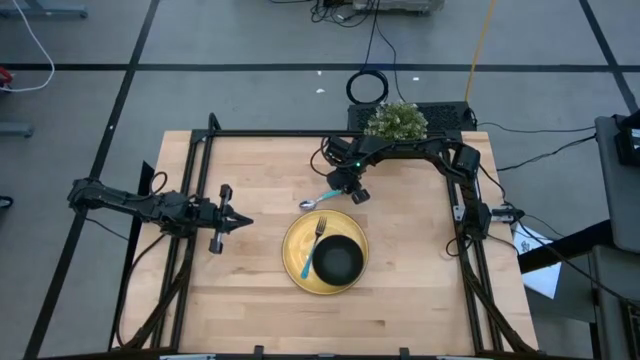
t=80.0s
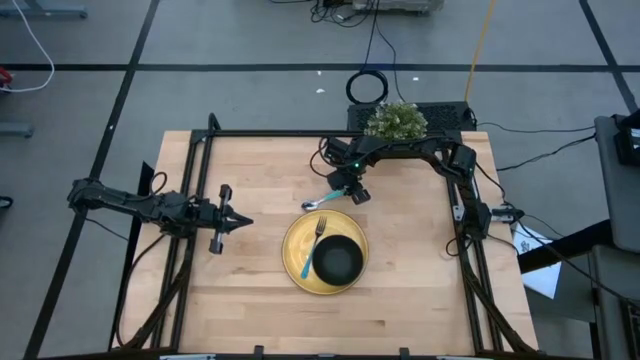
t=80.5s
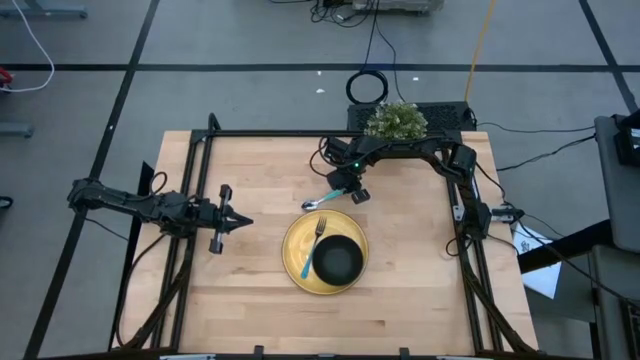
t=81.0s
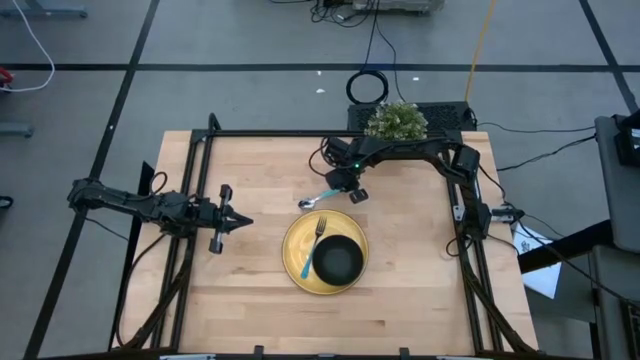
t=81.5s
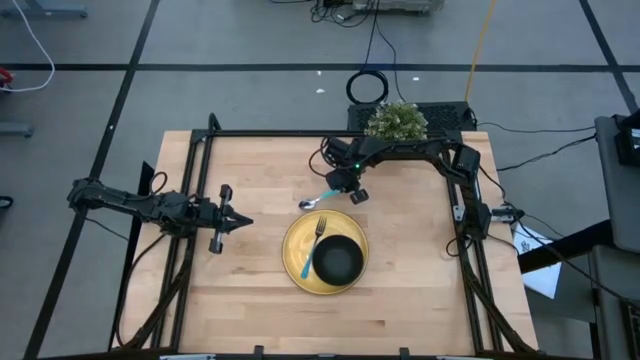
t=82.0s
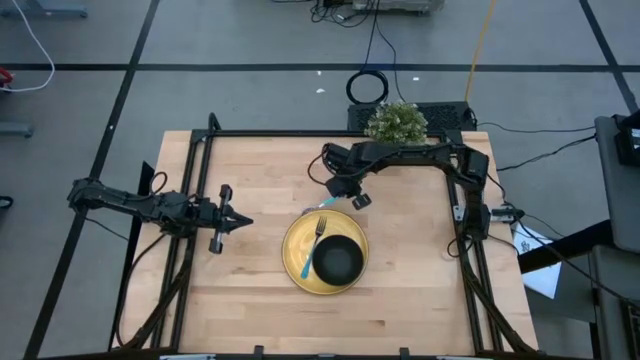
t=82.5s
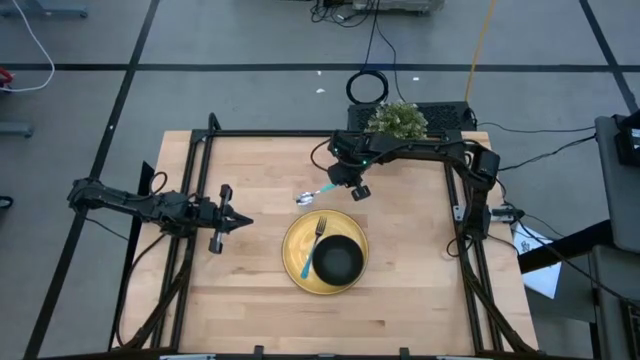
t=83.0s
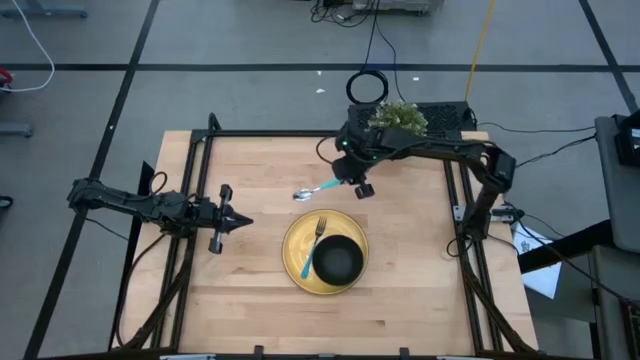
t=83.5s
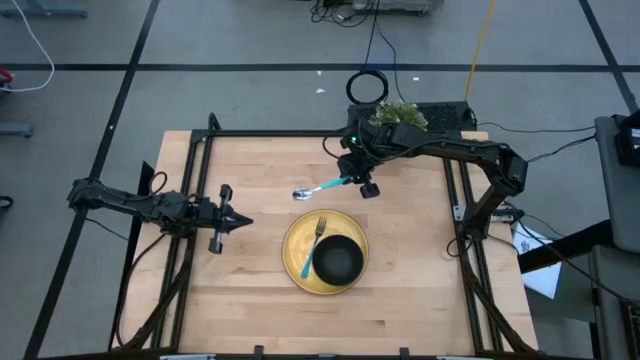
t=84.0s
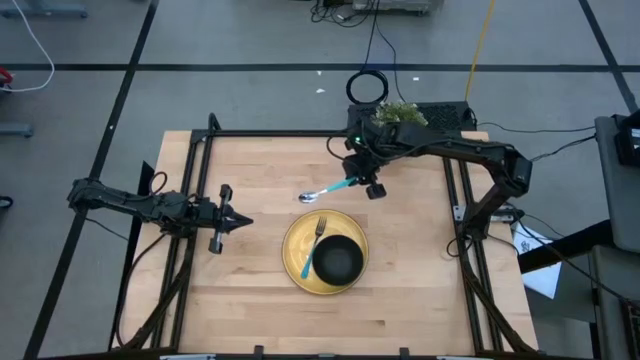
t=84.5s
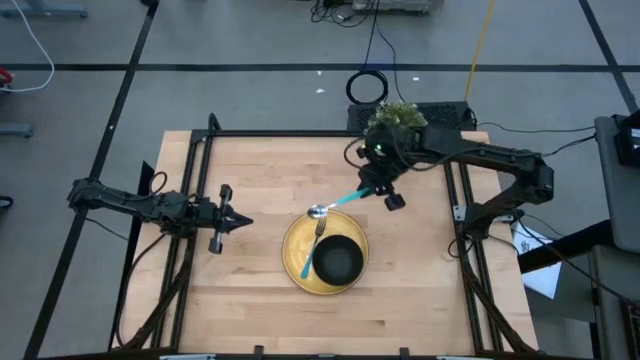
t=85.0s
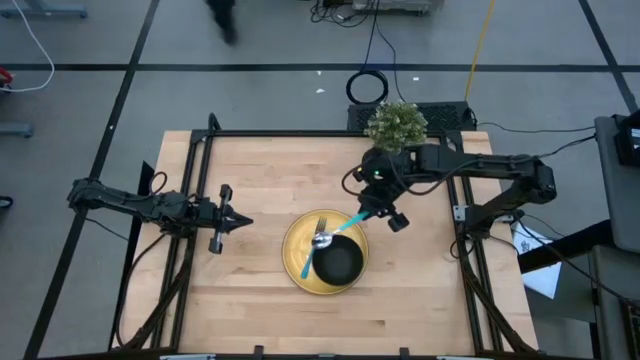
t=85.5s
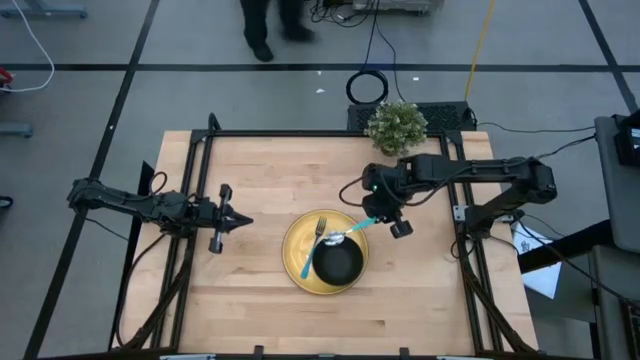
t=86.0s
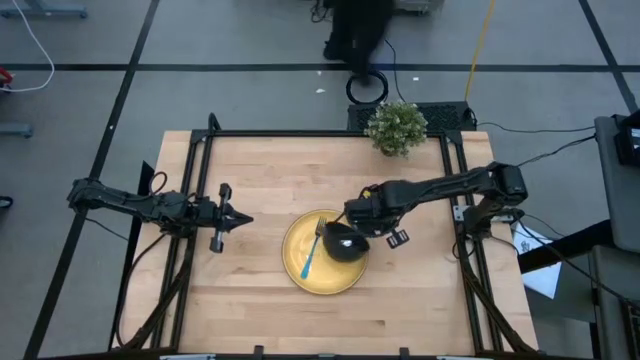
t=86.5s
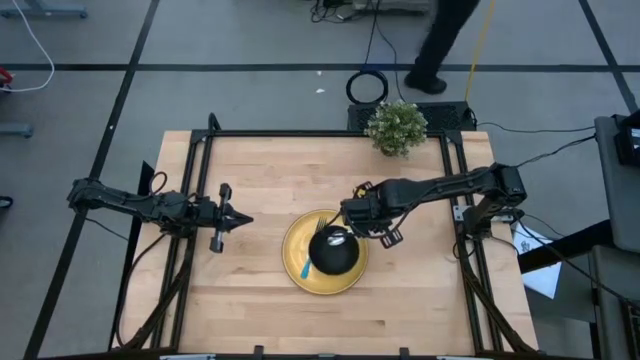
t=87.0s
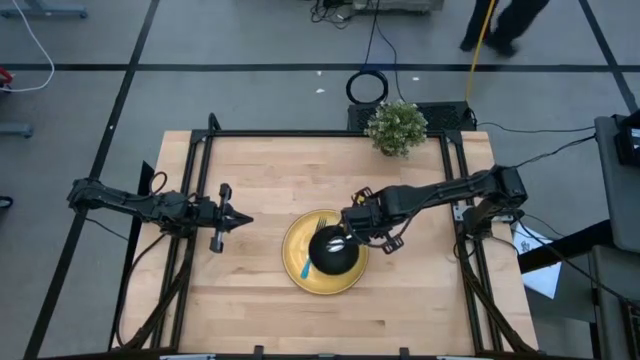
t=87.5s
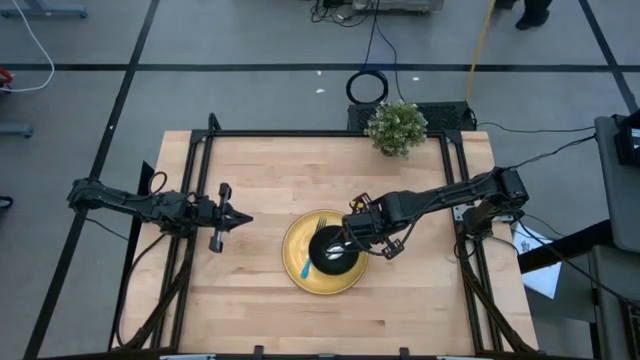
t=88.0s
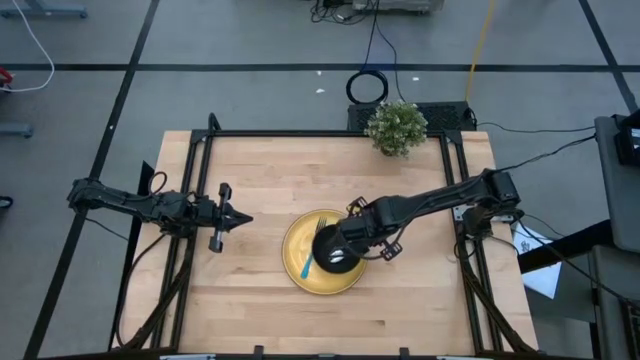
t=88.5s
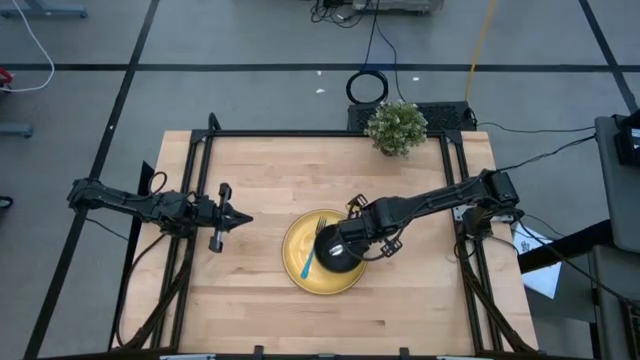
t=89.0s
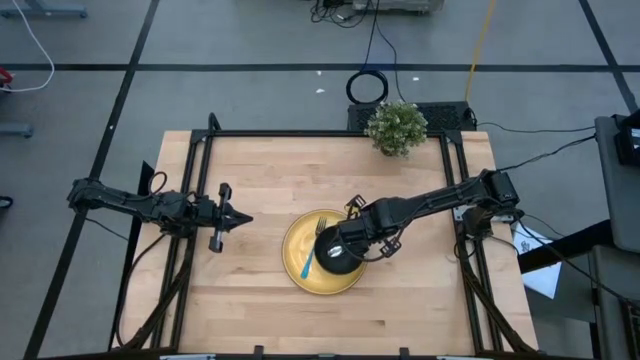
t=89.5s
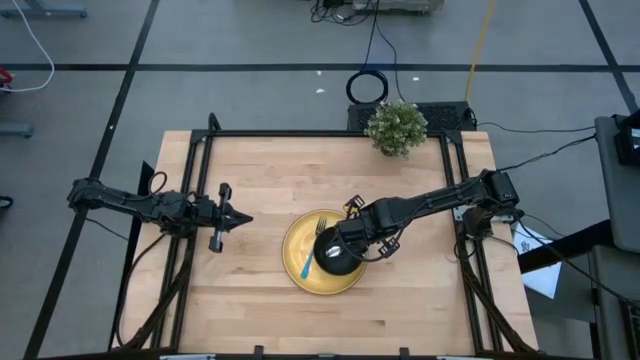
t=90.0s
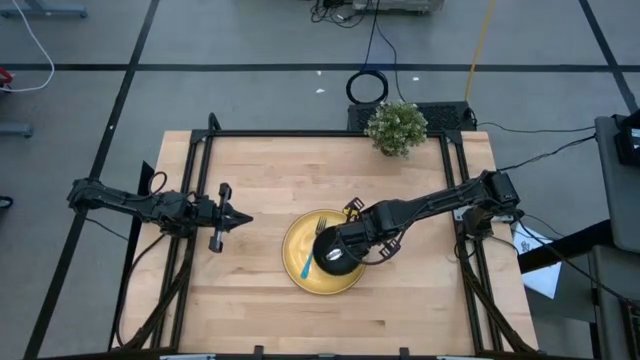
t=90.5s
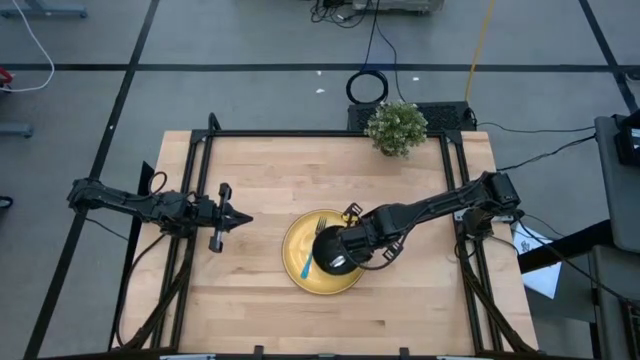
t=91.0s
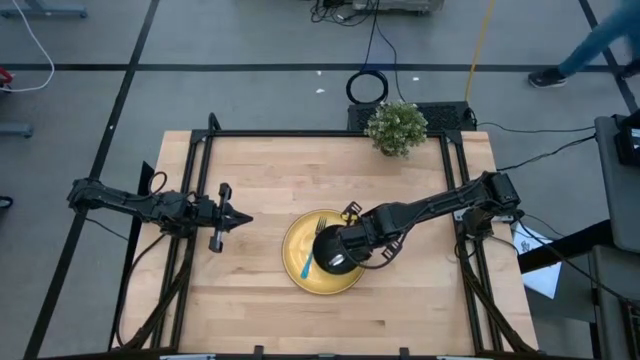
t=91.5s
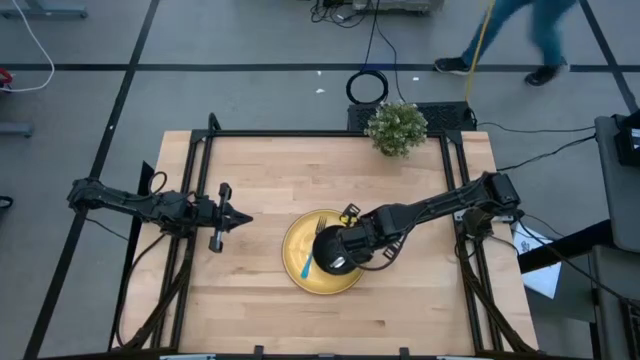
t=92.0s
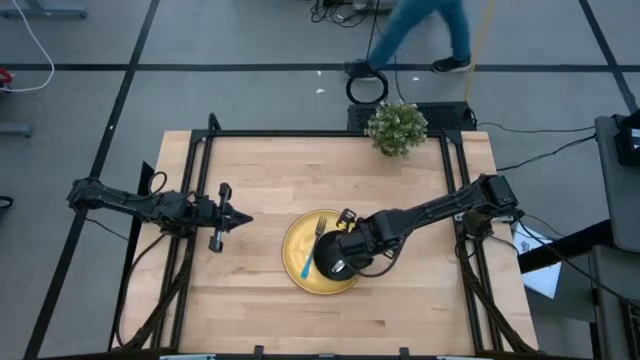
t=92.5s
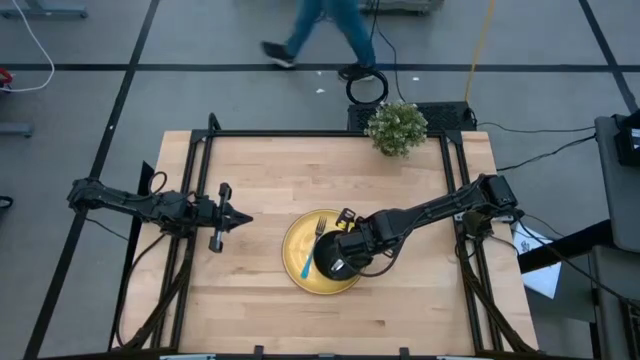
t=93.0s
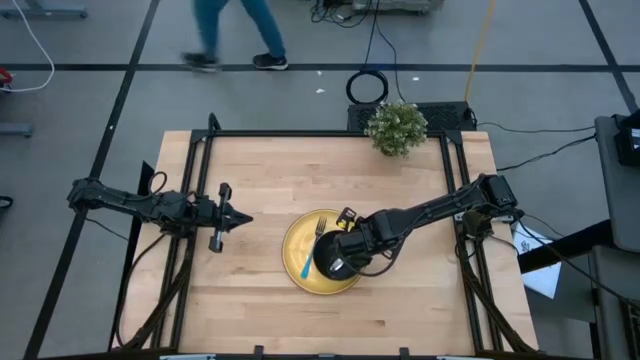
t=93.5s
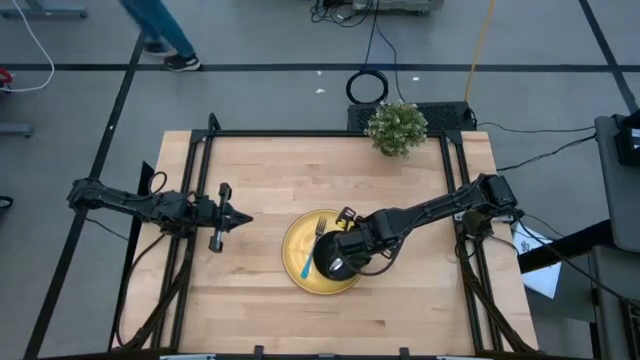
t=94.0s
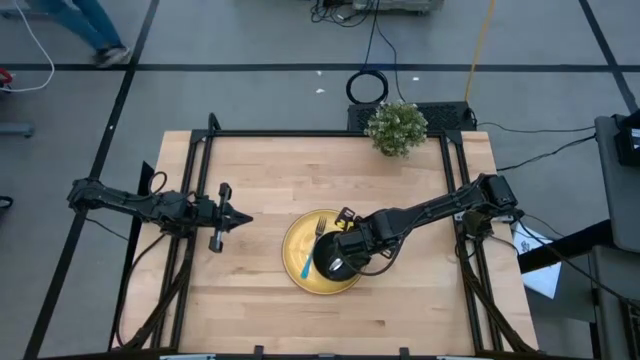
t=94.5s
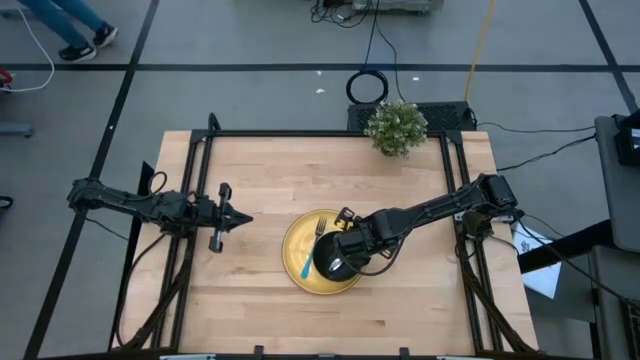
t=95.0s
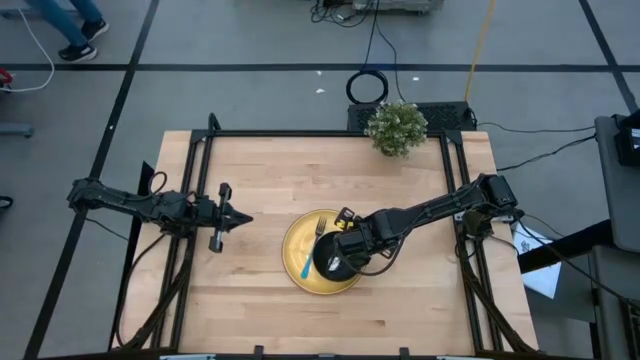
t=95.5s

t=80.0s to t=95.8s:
Task: Set table place
Put the blue spoon into the black bowl

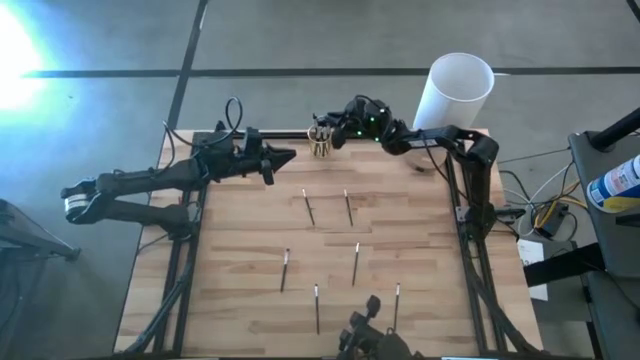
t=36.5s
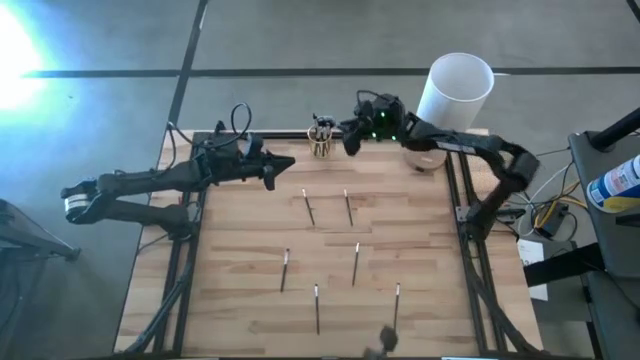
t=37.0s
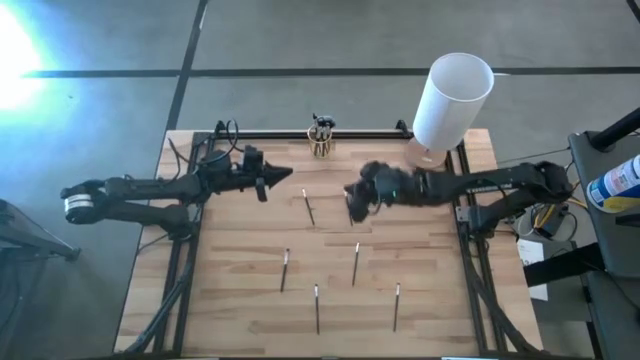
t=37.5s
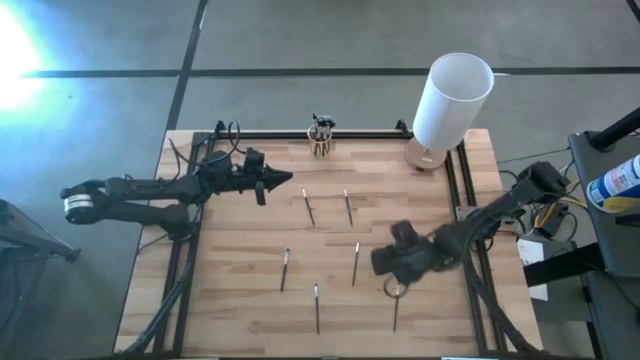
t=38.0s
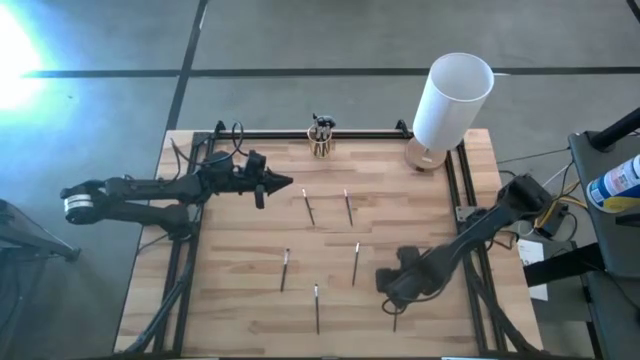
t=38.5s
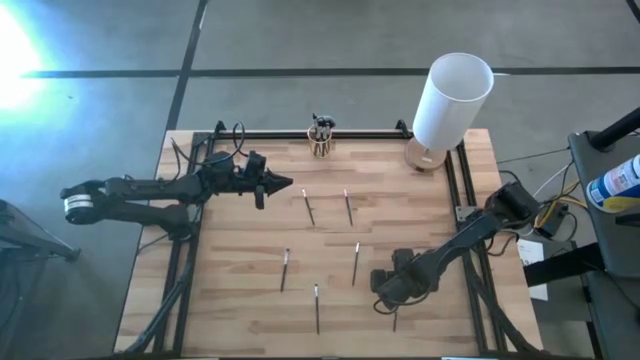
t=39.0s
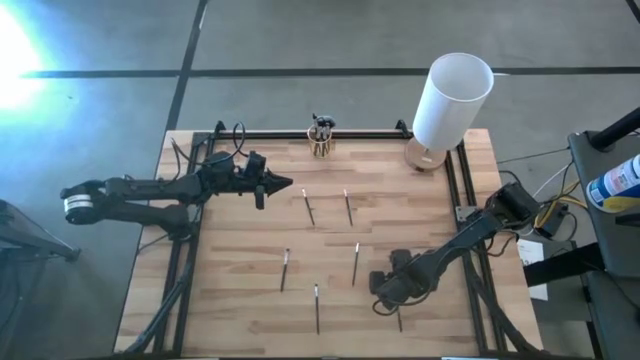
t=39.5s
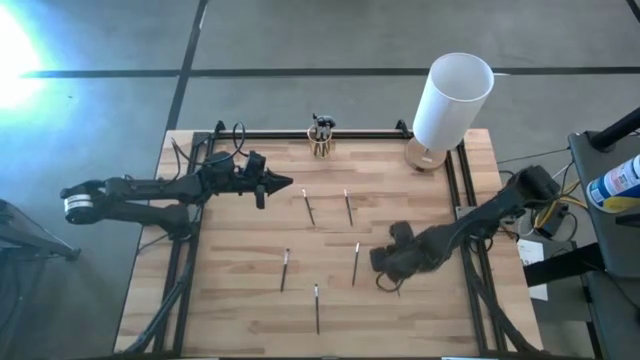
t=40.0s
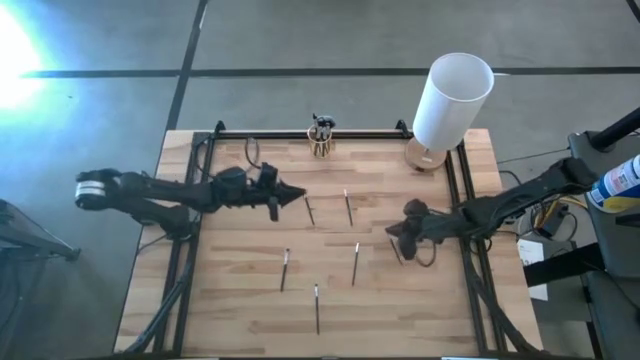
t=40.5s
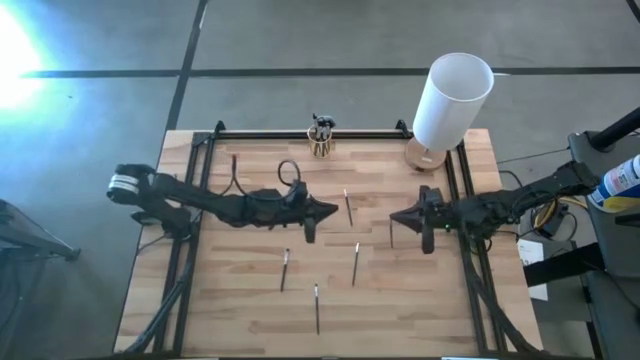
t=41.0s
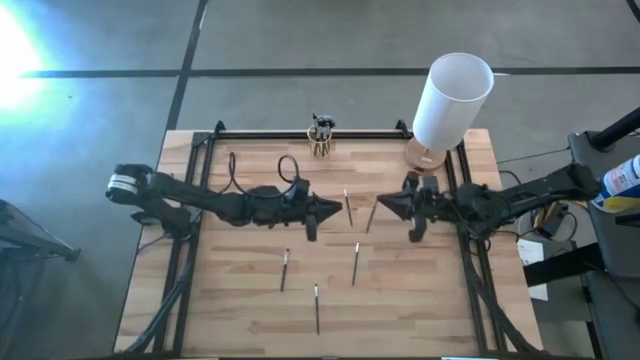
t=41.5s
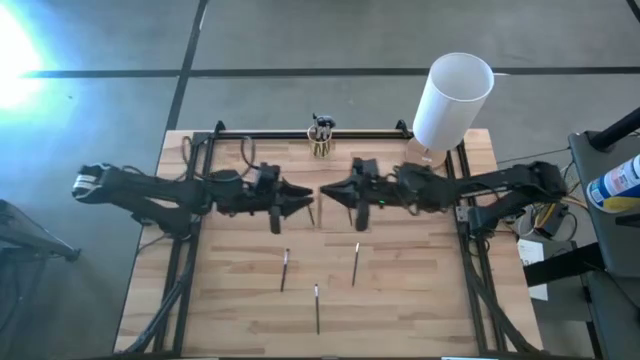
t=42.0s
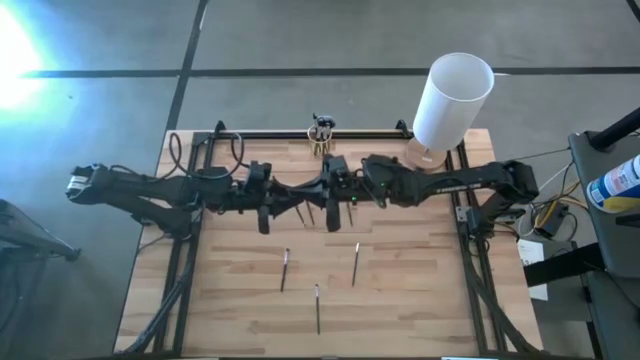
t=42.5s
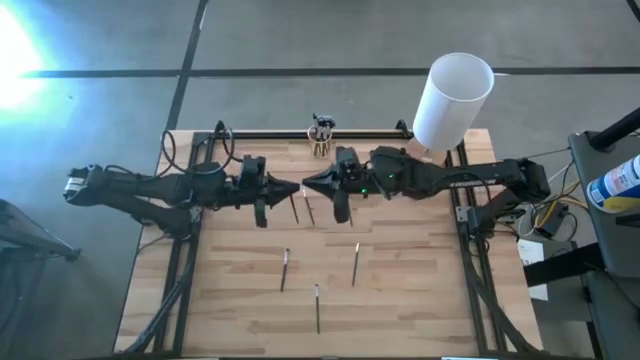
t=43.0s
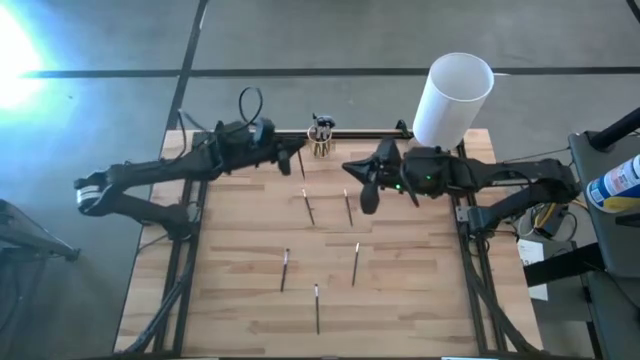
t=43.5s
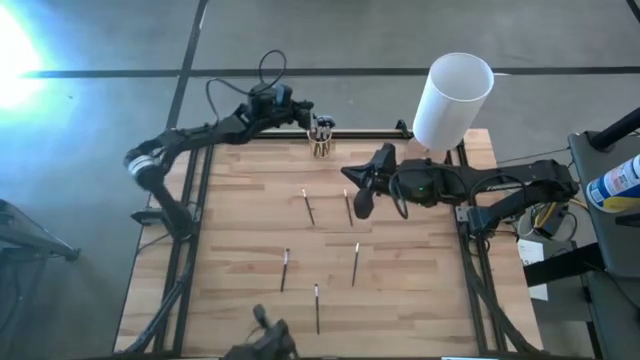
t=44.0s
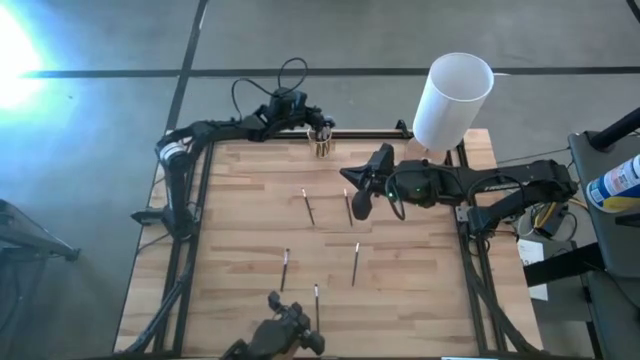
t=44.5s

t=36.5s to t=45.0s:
Task: Put items in baskets/containers
Put the black eyeshadow brush into the yellow pen holder
